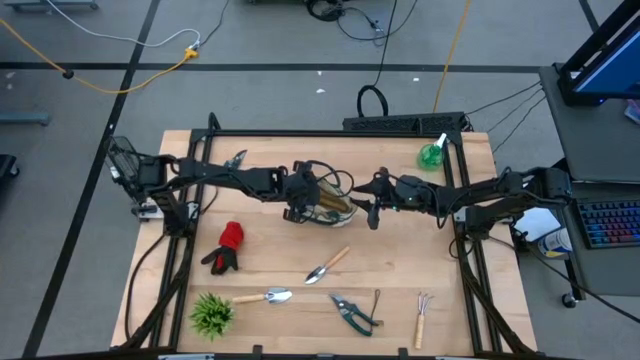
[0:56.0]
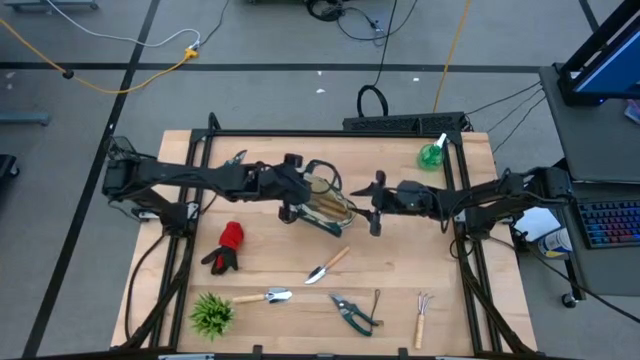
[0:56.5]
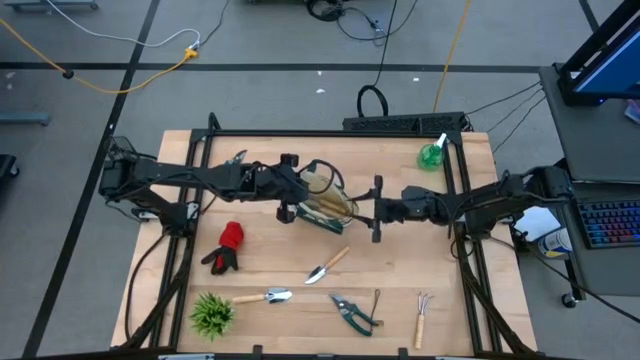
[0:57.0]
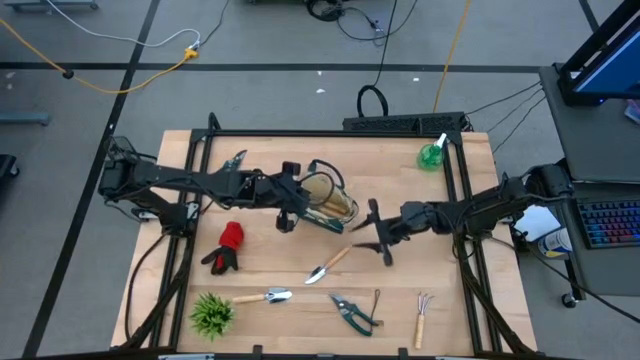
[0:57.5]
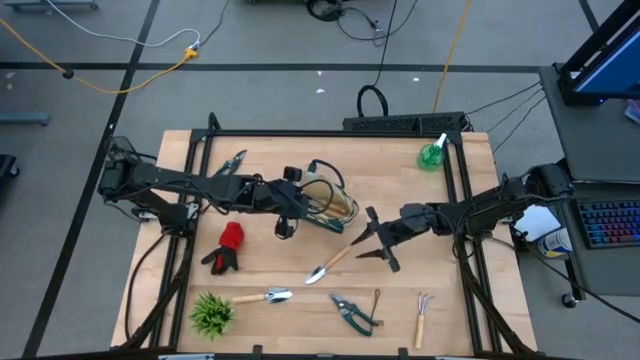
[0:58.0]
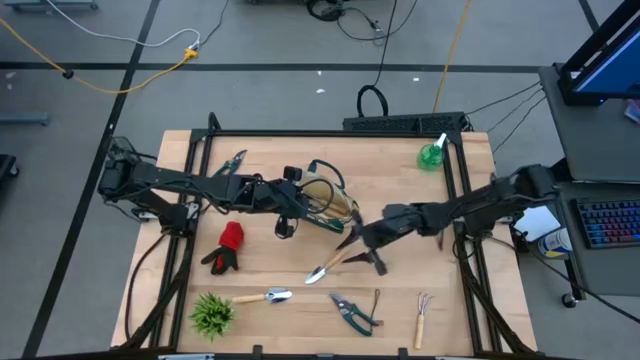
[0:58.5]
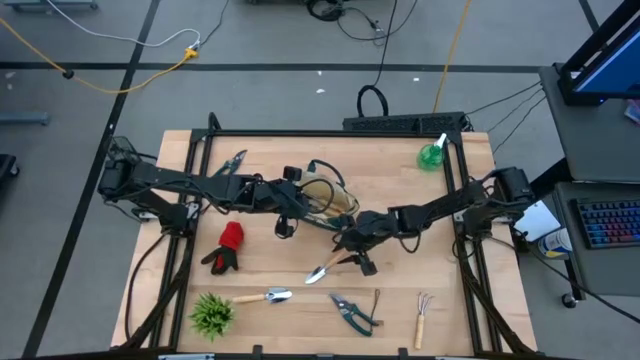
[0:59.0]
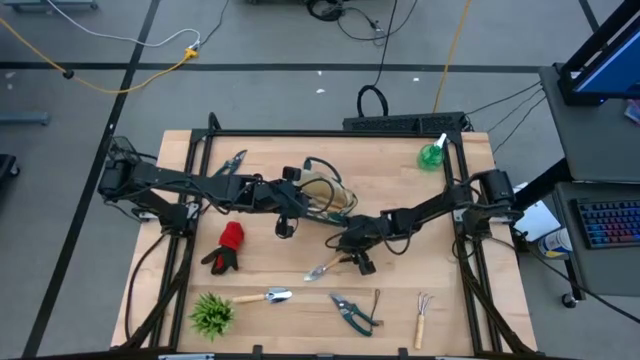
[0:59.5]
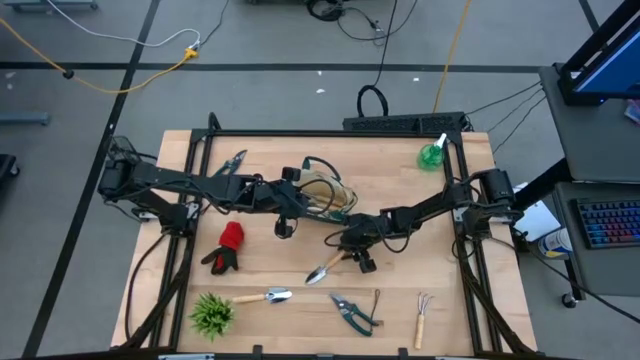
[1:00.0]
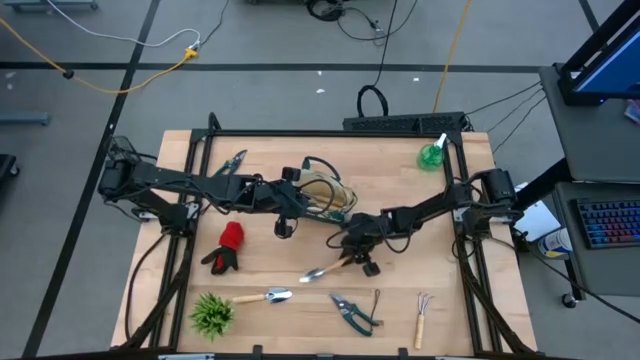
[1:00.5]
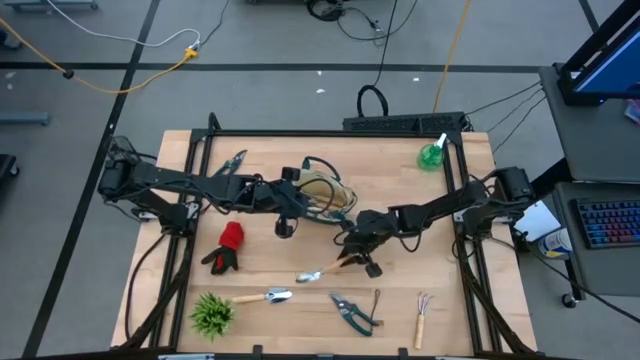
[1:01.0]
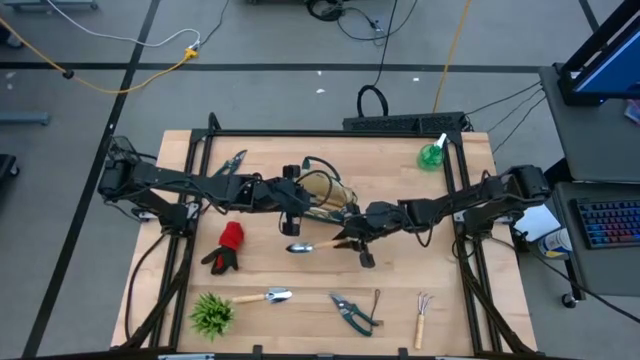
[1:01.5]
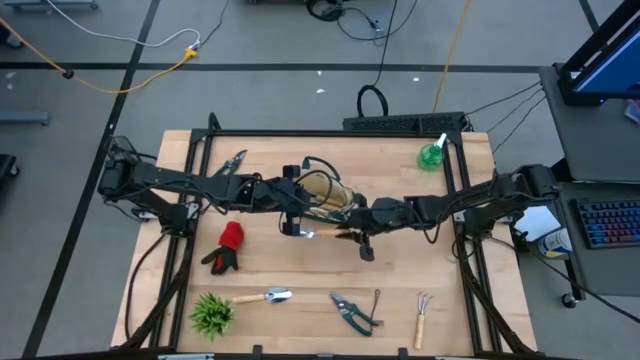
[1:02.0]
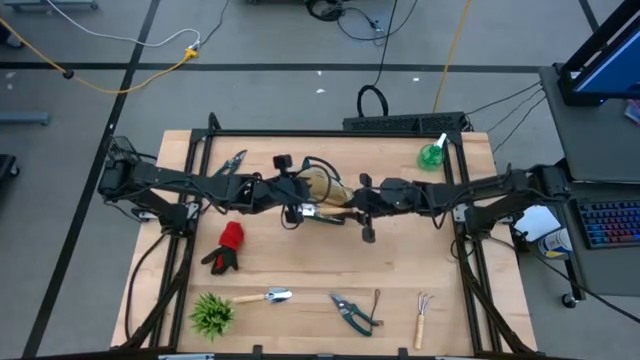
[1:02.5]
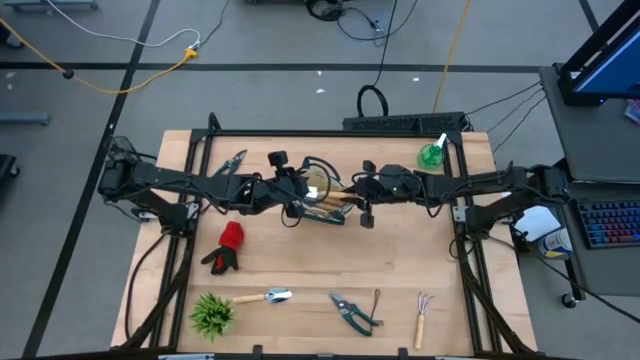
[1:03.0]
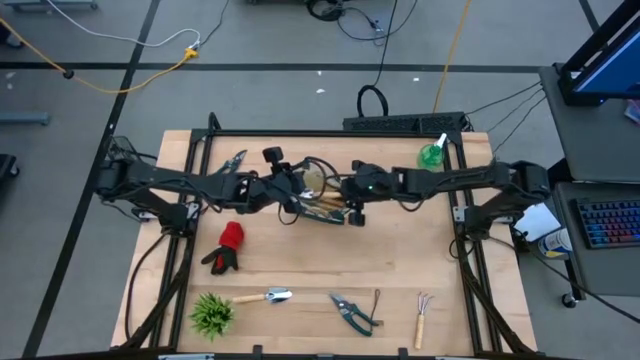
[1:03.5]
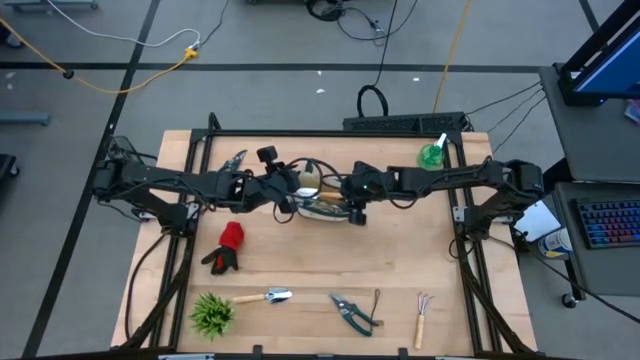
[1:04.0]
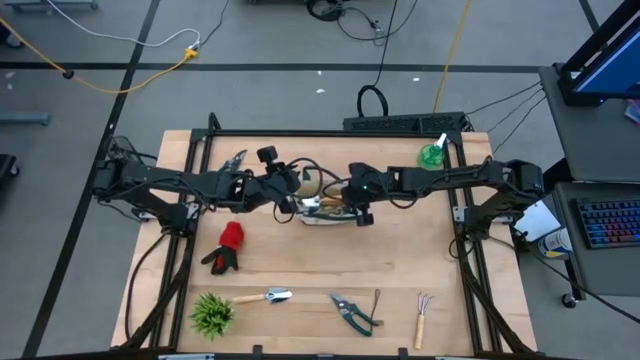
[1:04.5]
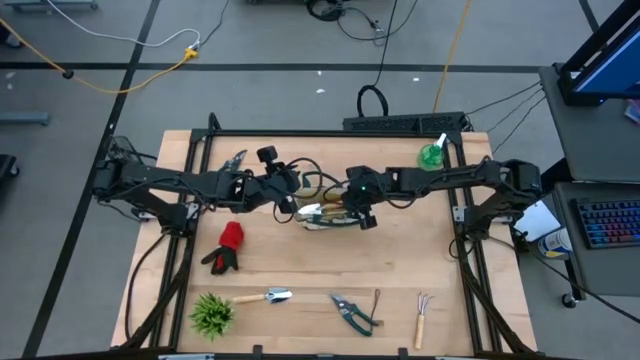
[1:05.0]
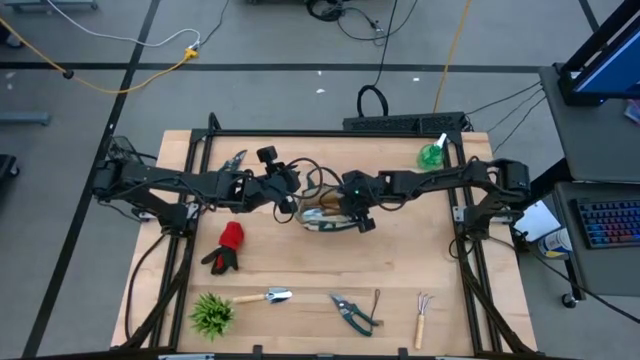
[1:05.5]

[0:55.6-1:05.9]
Task: Pick & Place Garden tools in Gardening bag
Put the top brown trowel into the gardening bag

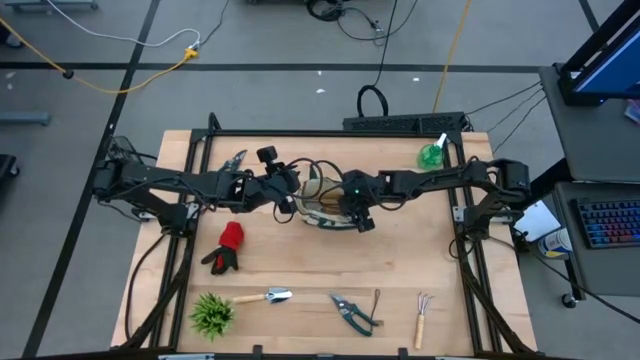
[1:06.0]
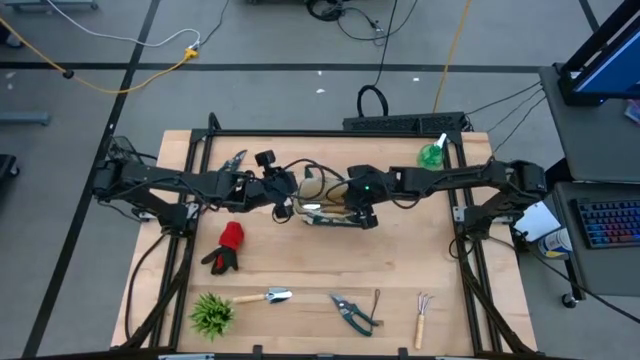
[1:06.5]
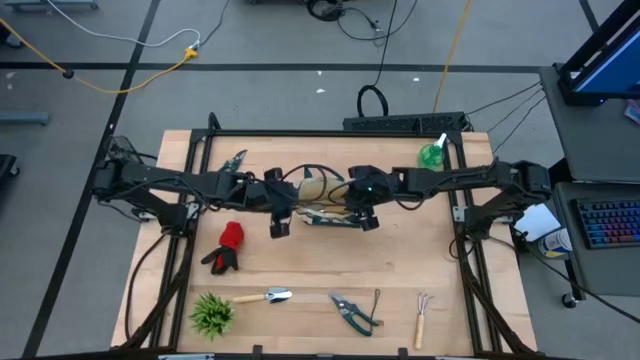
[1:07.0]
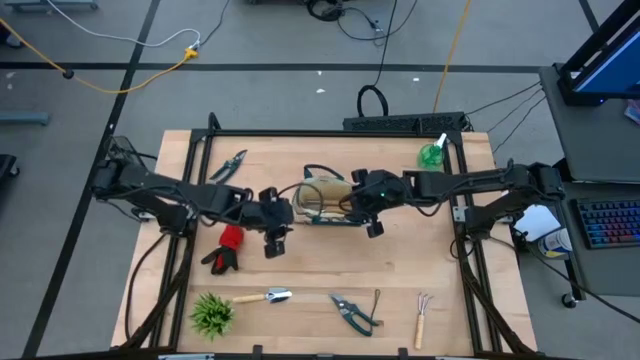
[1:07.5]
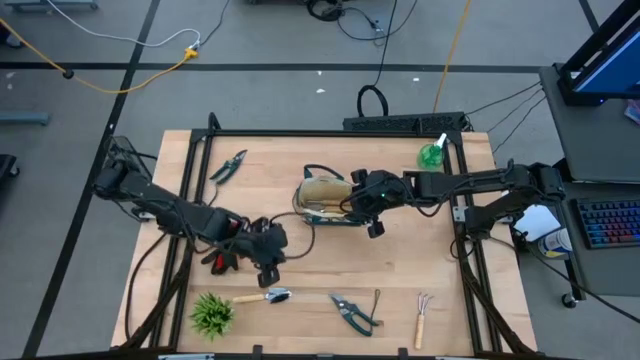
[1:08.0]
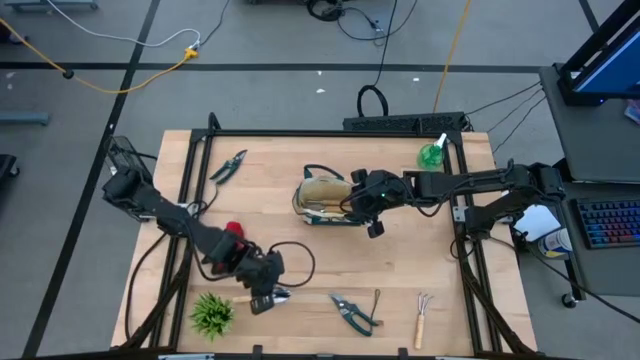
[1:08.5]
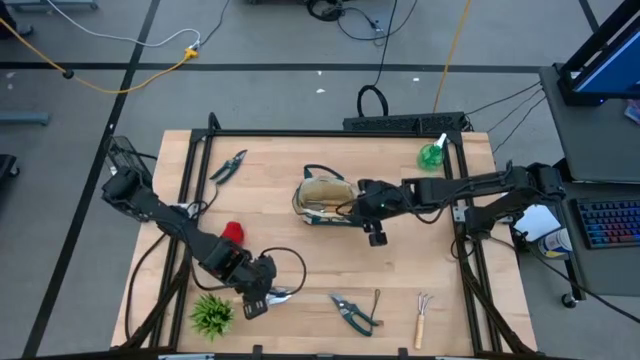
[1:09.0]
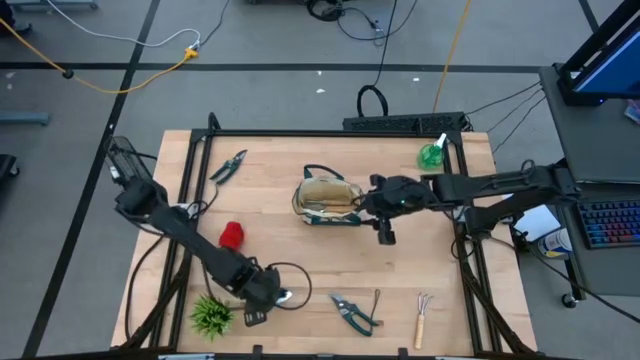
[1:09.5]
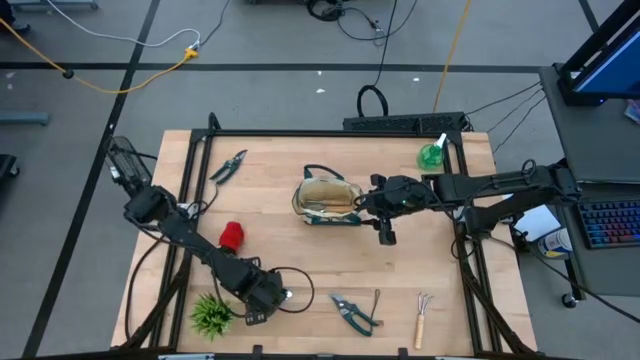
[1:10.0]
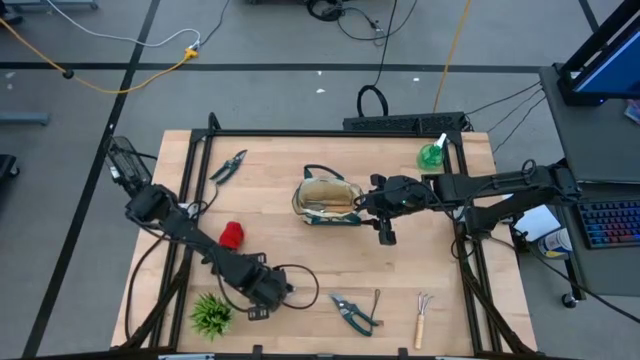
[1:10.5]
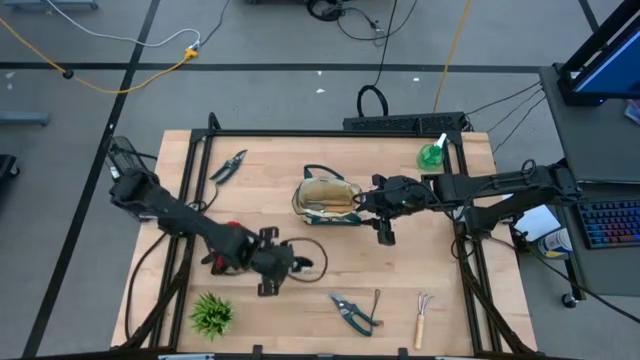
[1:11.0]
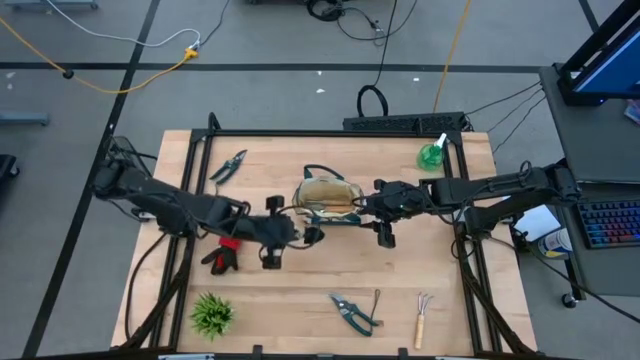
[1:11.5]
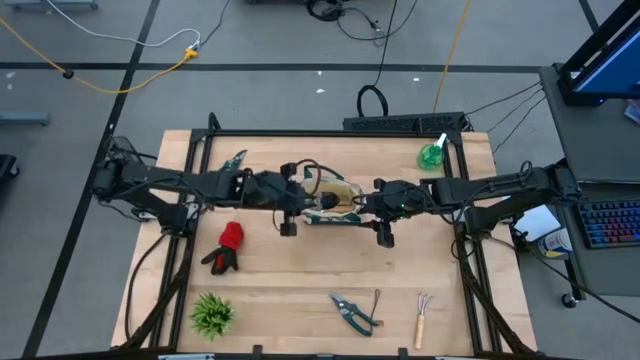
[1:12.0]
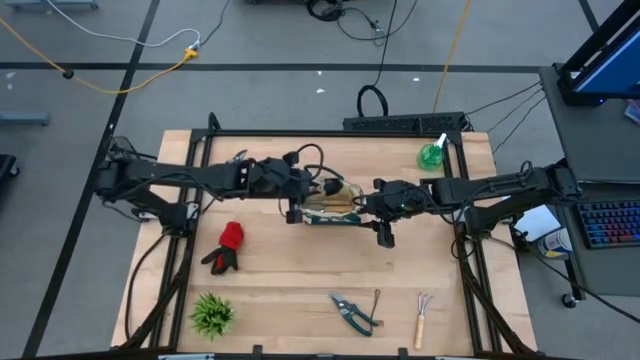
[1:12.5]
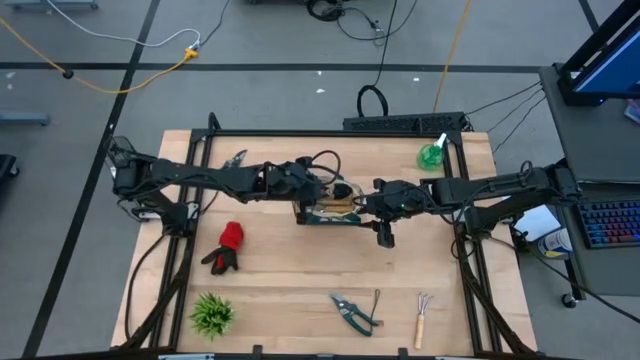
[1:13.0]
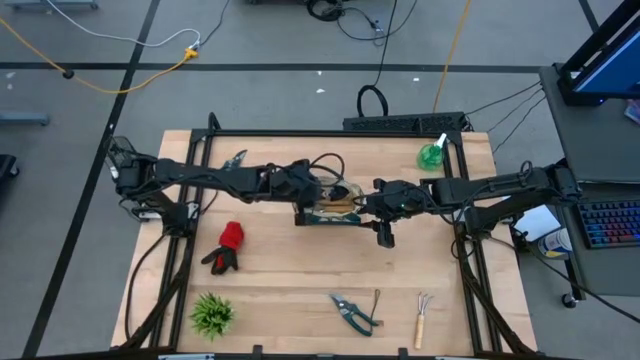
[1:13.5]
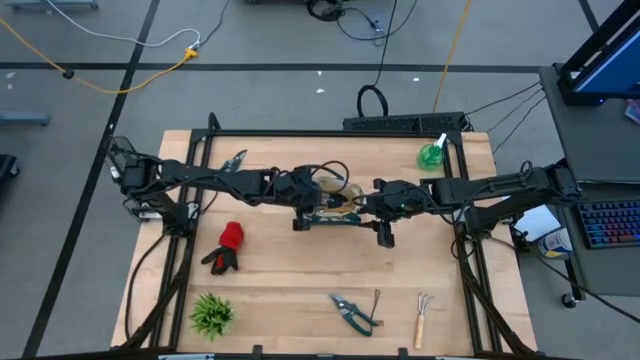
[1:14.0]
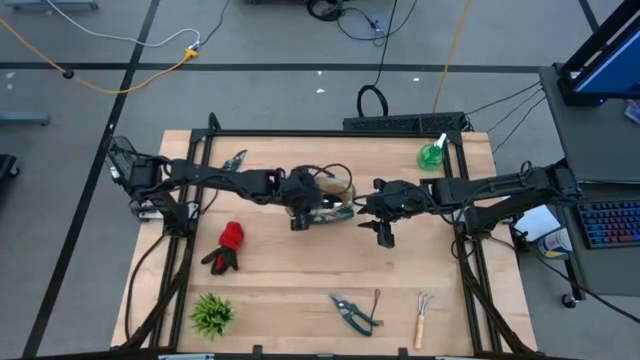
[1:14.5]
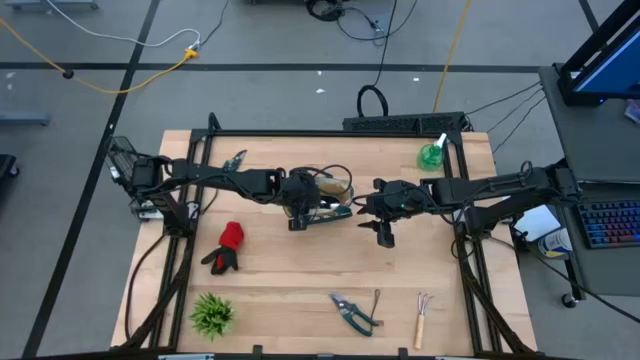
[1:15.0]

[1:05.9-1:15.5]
Put the brown trowel into the gardening bag

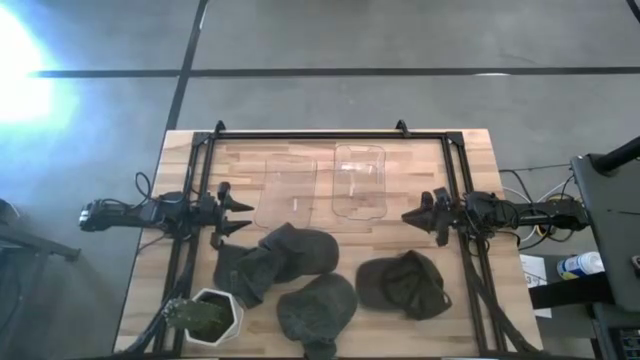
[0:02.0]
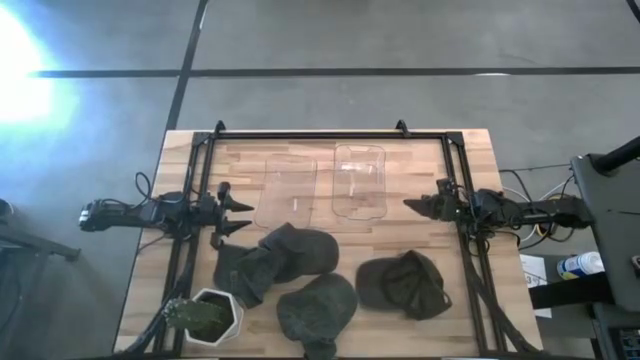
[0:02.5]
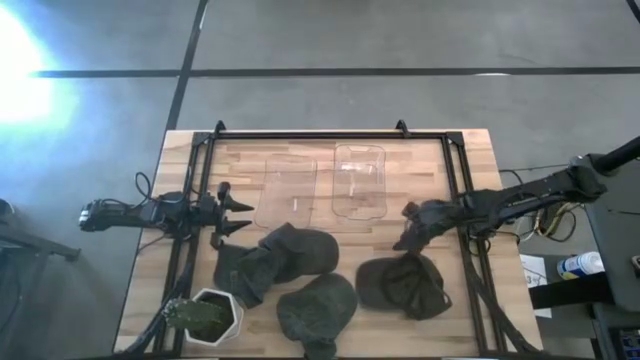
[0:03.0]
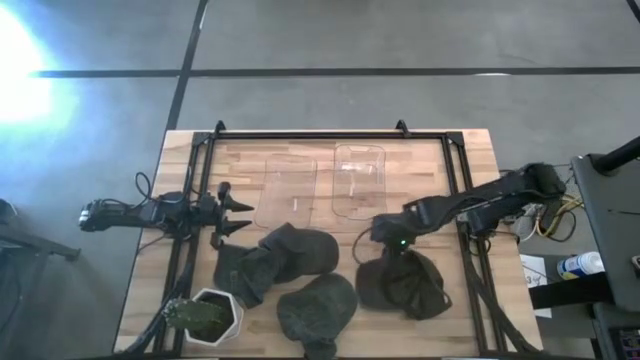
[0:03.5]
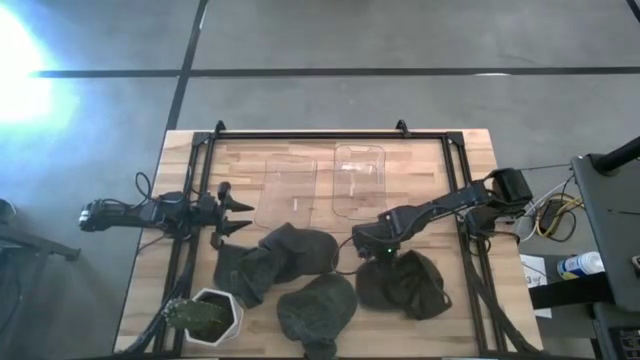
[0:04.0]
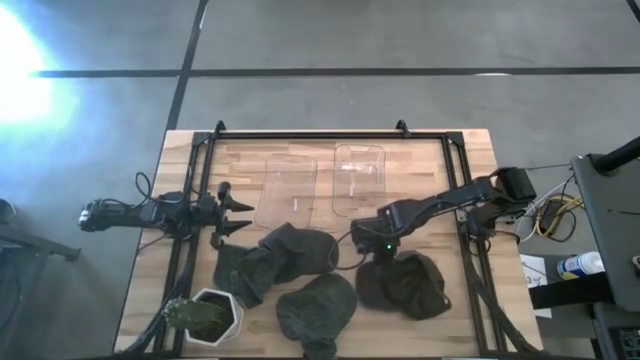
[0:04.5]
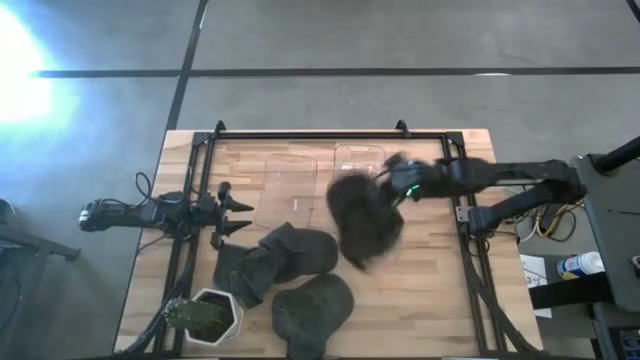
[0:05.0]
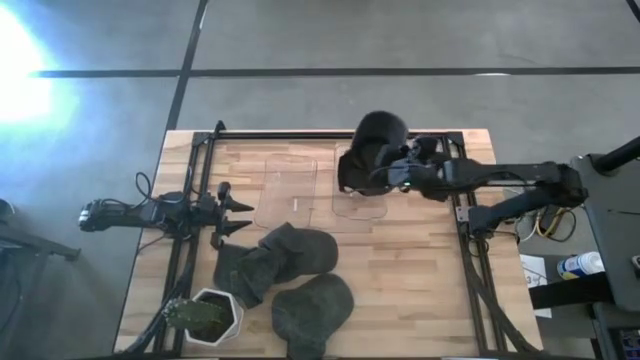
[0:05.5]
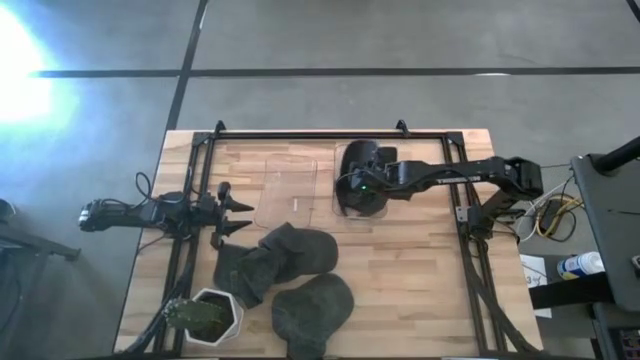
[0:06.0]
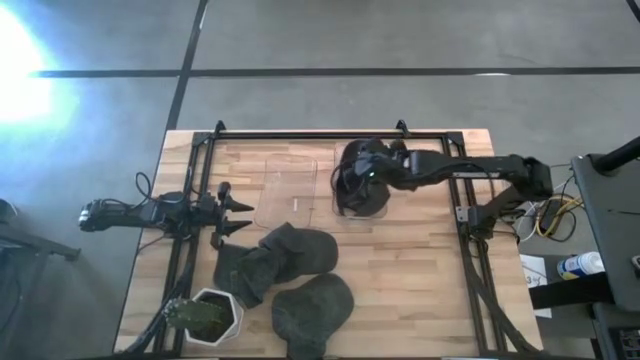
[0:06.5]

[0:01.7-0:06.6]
Task: Pick & Place hat
Put the right black cap into the right transparent bin
